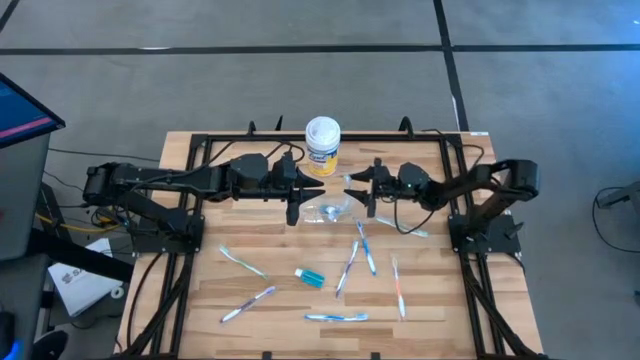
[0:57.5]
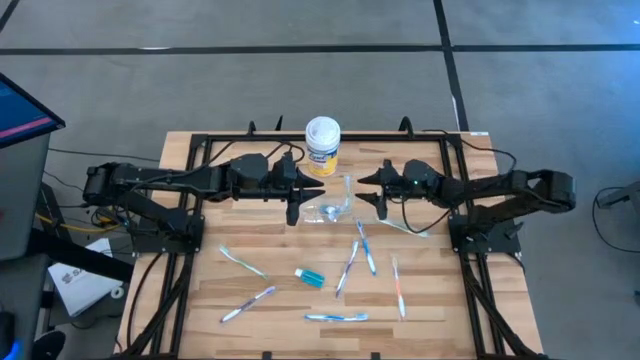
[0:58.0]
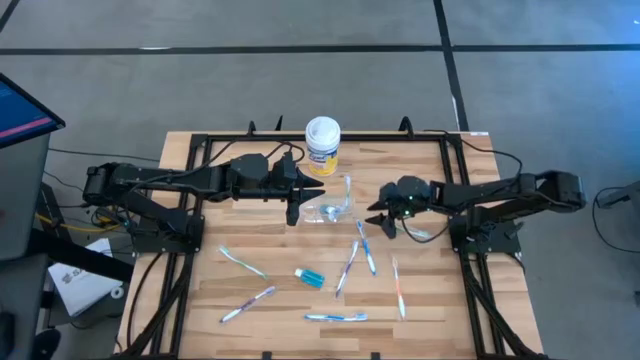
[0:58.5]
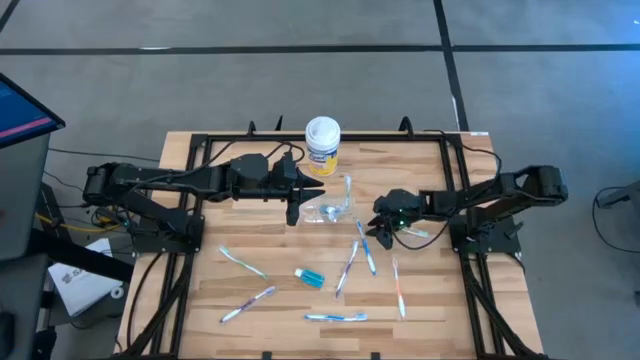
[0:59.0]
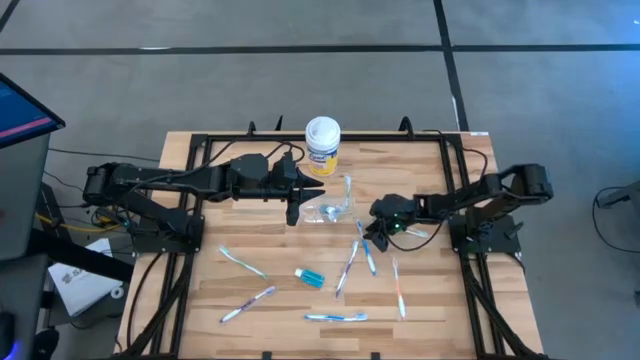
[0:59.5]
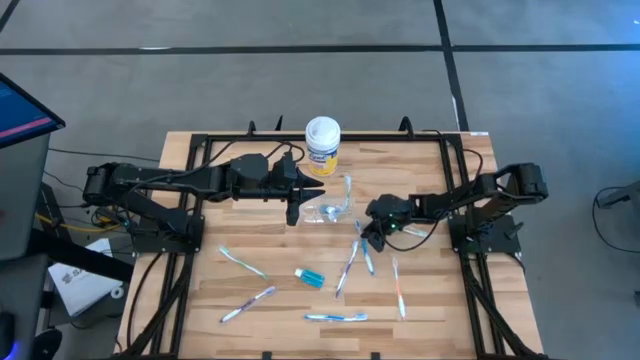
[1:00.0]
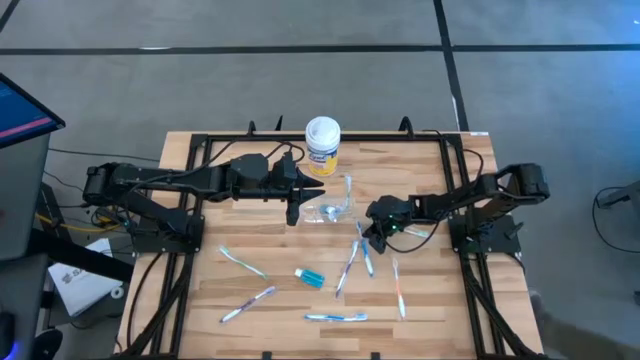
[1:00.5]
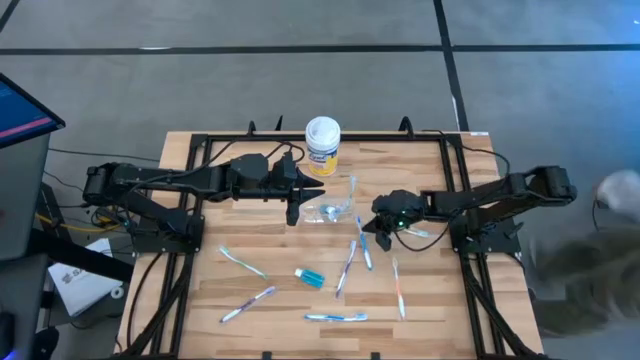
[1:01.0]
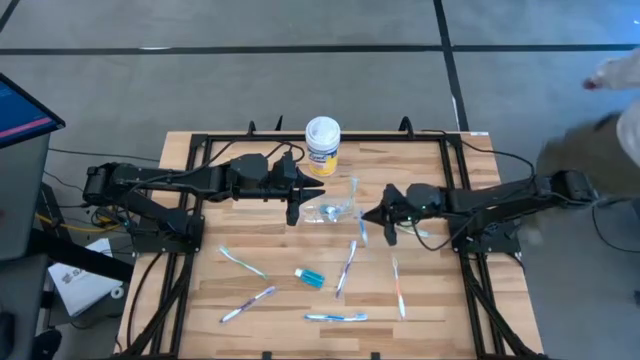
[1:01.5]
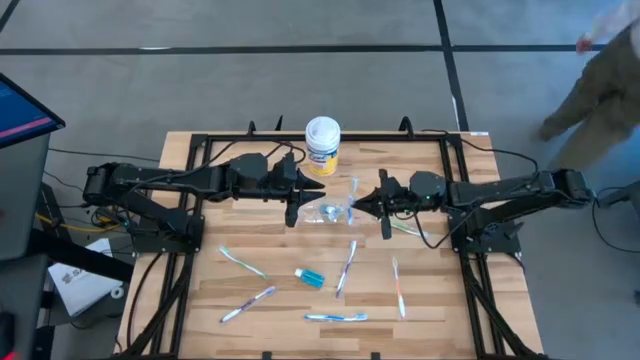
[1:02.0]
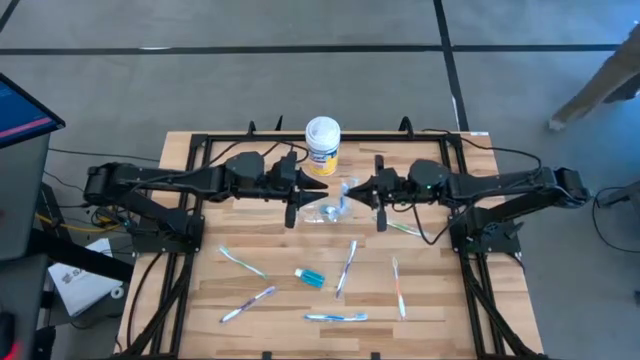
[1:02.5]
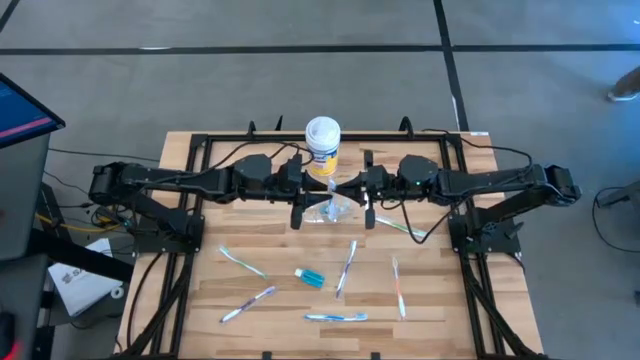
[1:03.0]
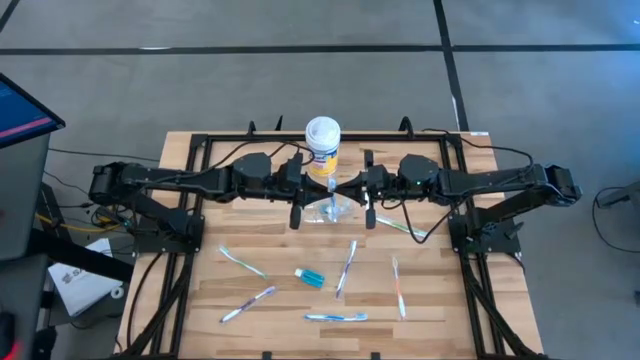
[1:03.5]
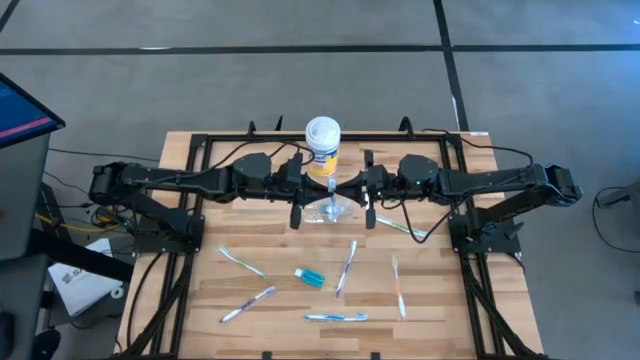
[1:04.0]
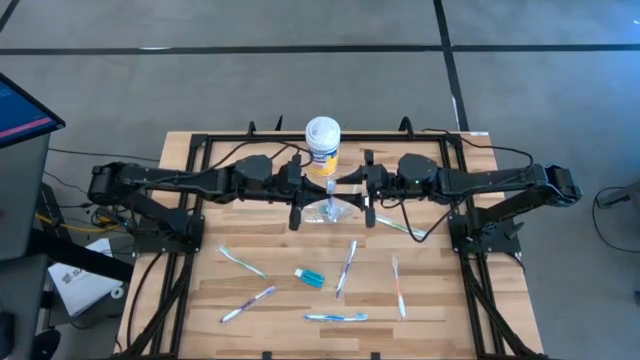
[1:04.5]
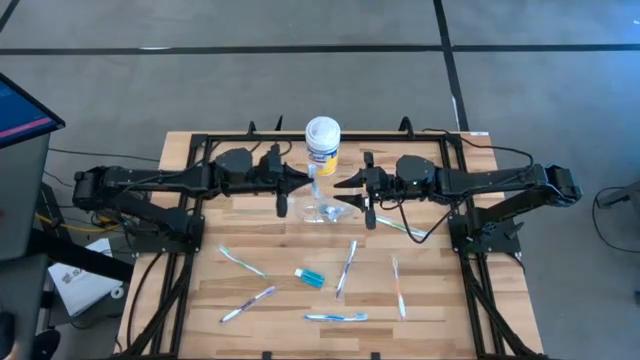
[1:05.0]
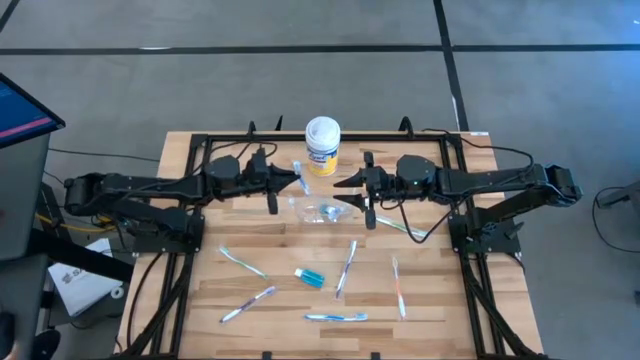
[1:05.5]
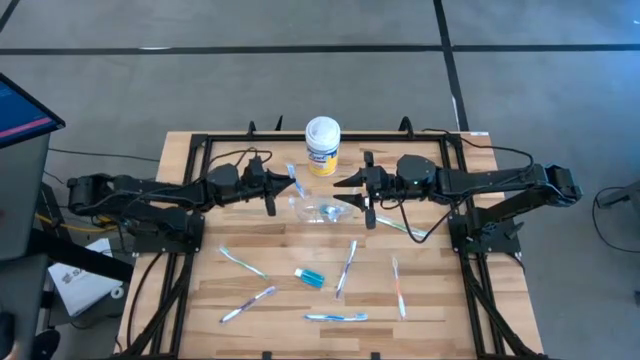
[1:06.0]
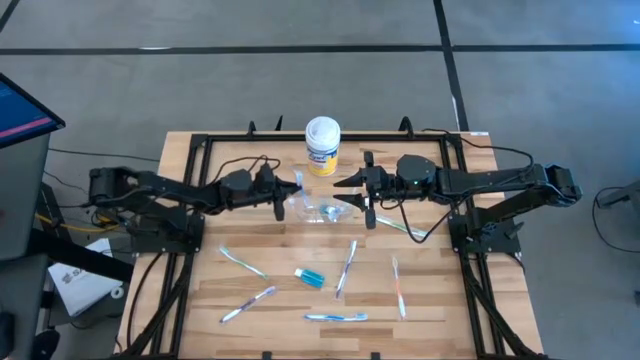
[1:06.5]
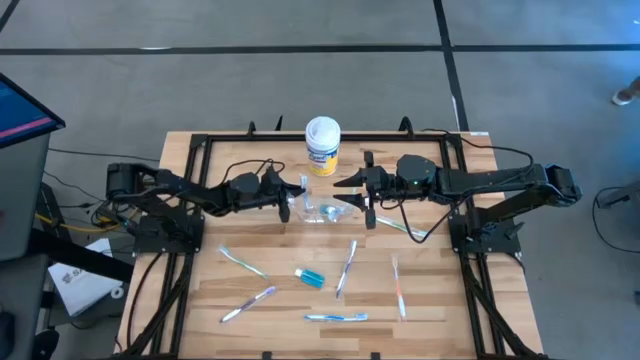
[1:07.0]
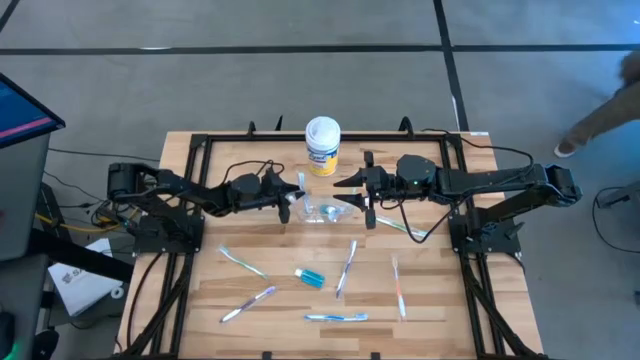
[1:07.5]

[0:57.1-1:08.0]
Task: Pick & Place toothbrushing station
Put the top blue toothbrush into the transparent organizer

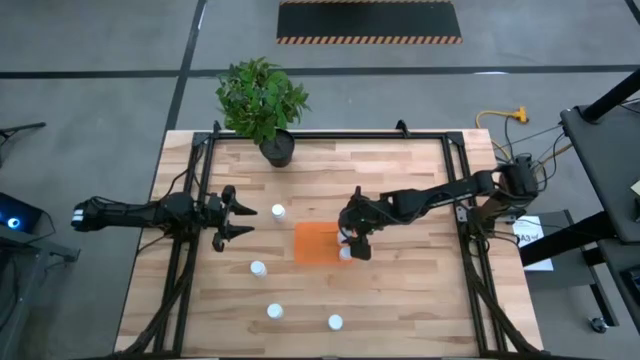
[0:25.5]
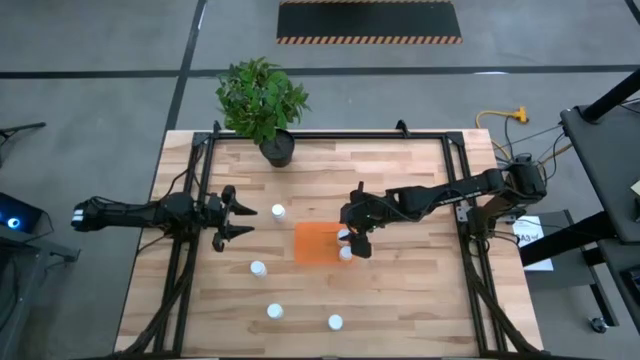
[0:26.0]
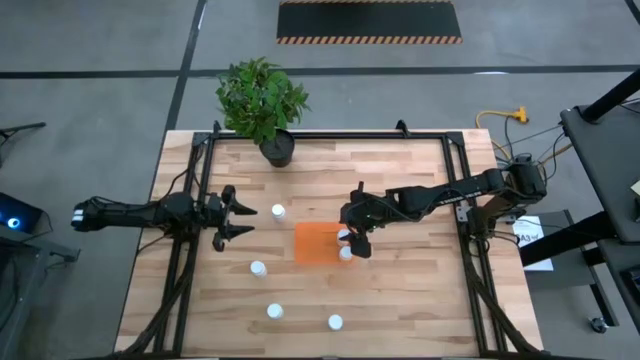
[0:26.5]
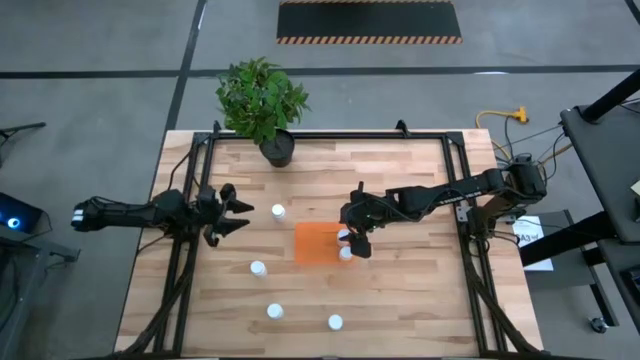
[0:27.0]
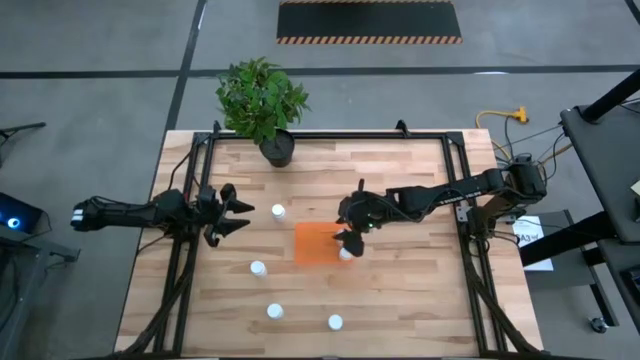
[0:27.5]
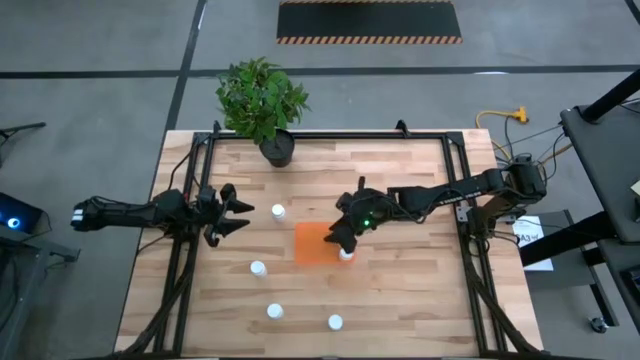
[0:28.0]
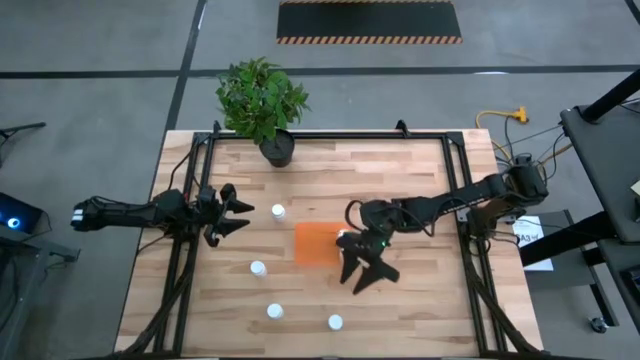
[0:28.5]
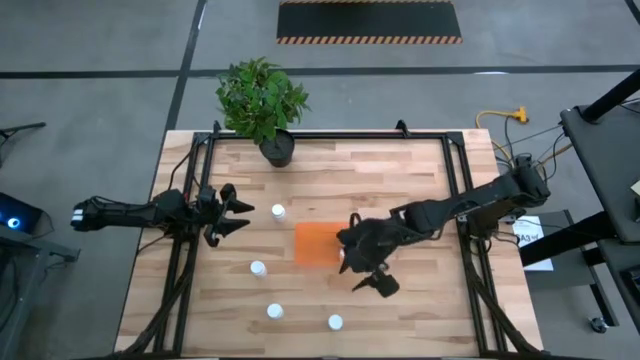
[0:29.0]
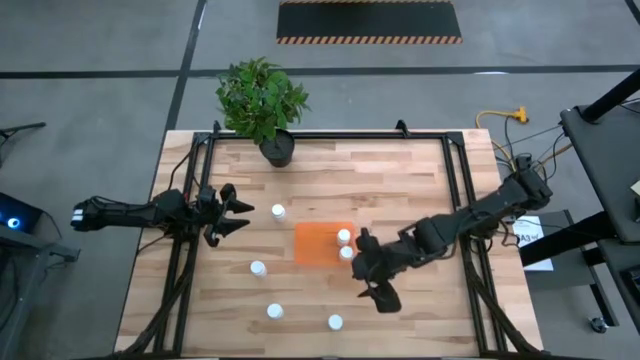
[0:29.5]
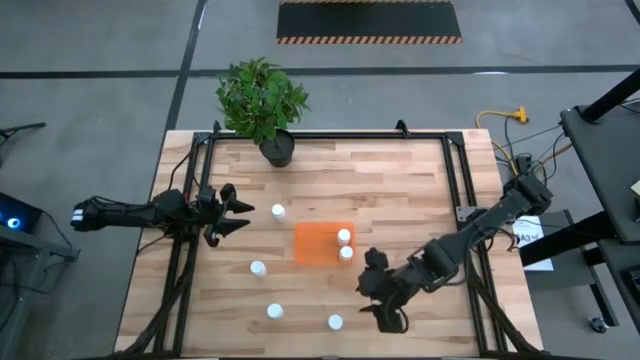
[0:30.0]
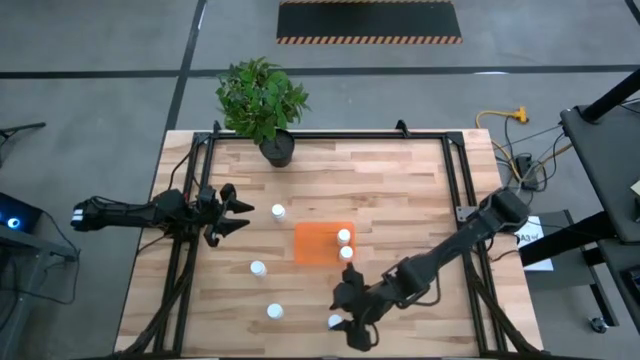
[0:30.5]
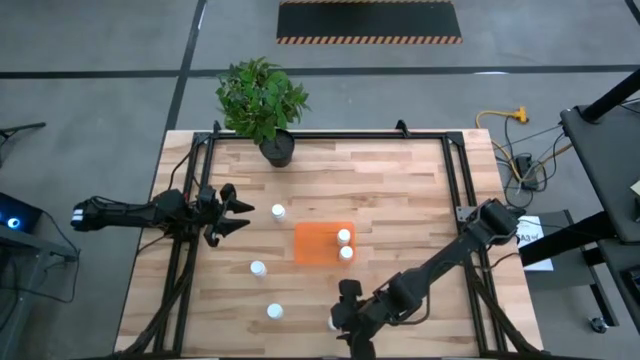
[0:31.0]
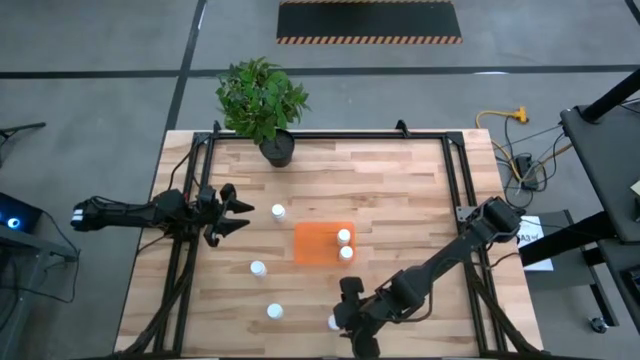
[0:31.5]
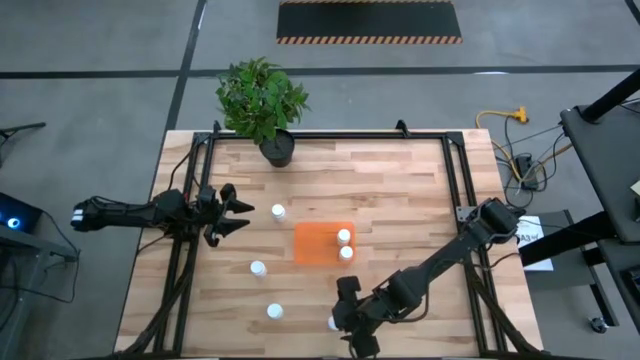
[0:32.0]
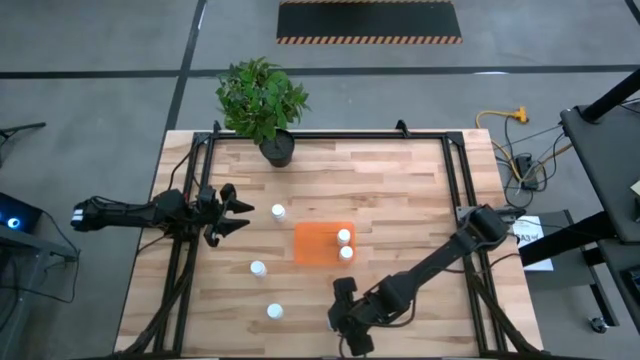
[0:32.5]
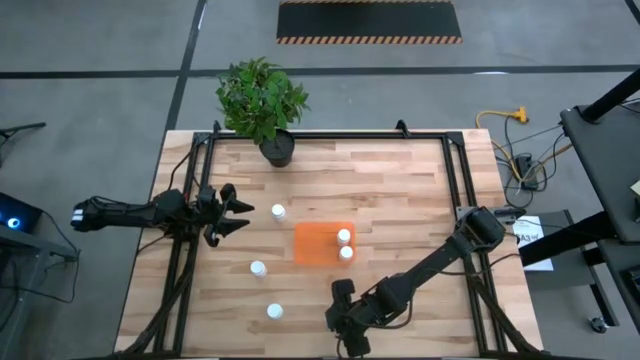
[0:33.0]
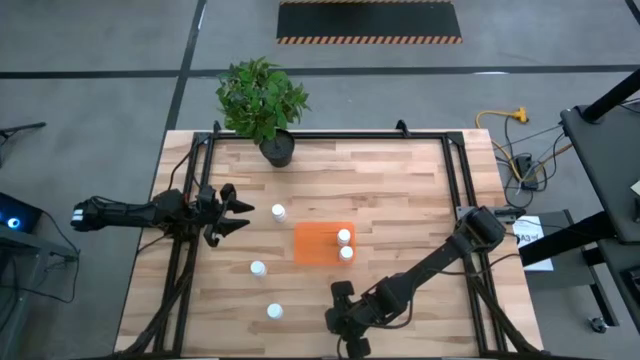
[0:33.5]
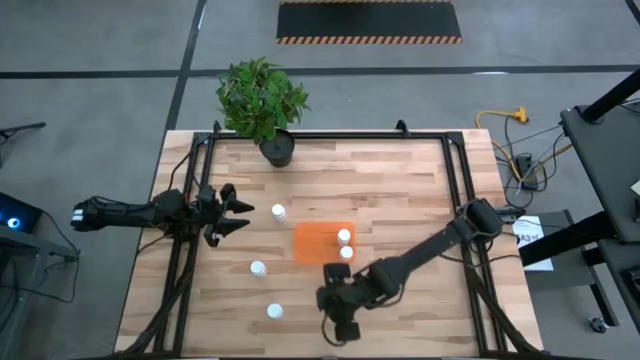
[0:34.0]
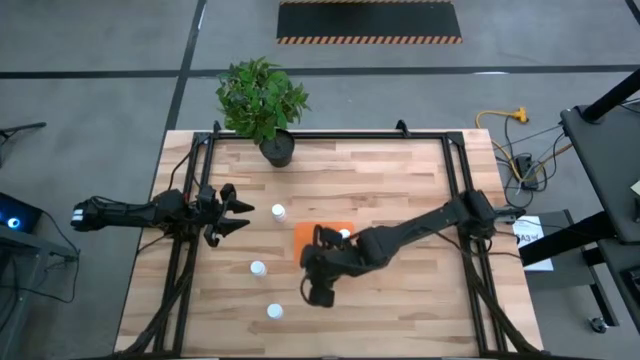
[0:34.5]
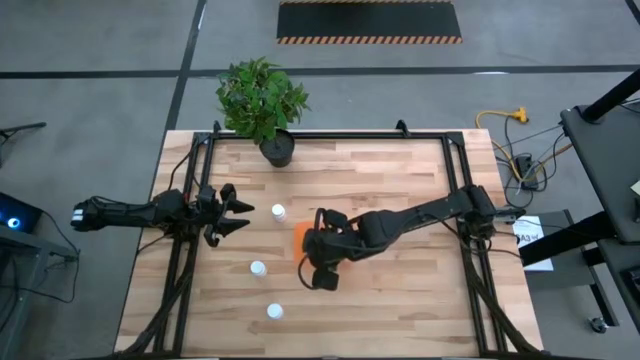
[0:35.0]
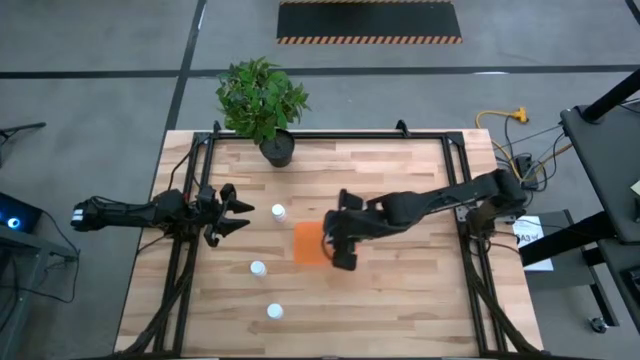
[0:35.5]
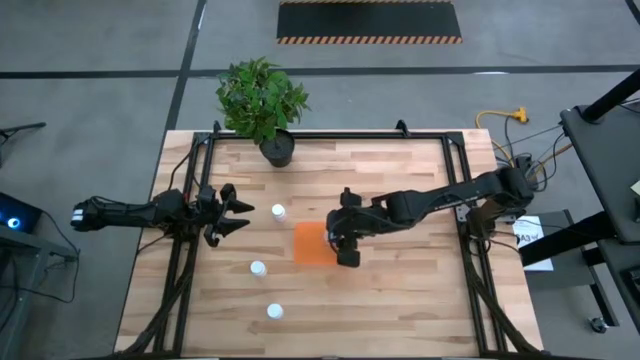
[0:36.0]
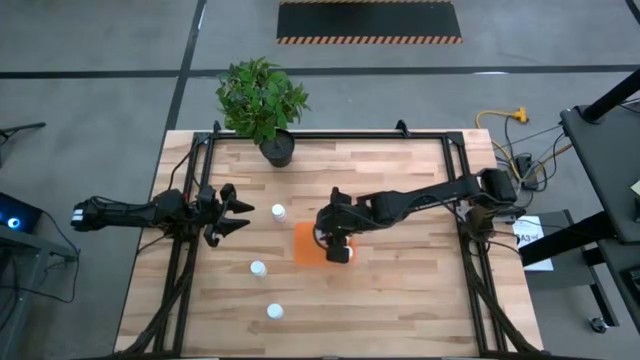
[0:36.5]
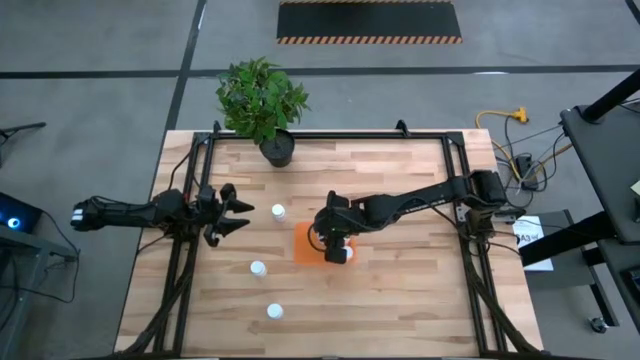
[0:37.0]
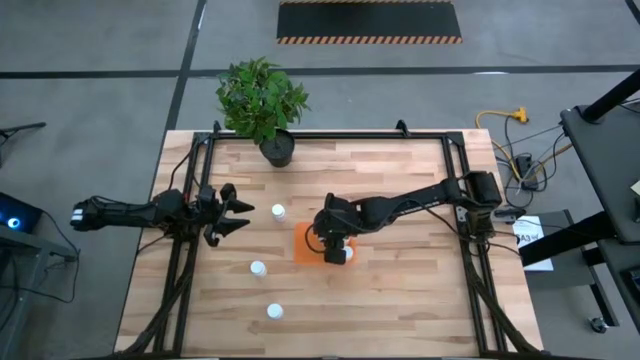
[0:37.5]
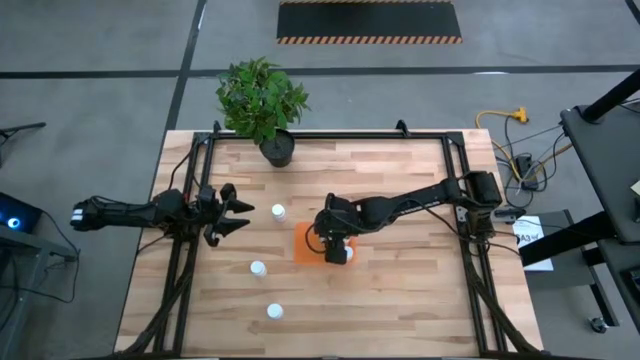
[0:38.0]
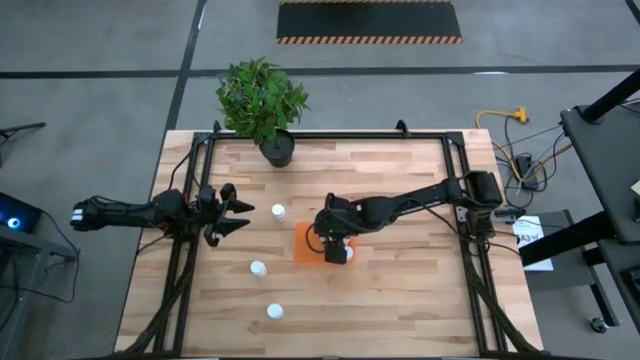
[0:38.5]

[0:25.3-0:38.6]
Task: Pick and place pill bottles into a basket
Put the white pill bottle into the orange bin
